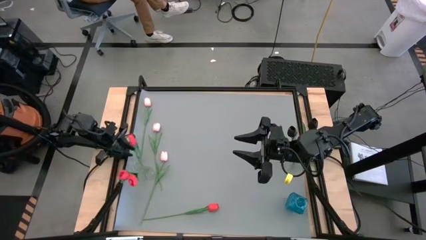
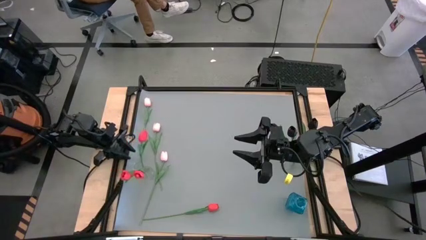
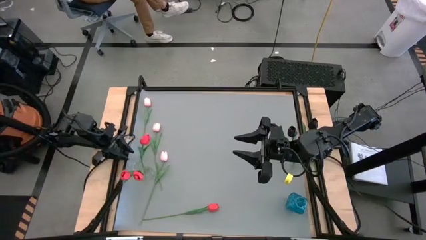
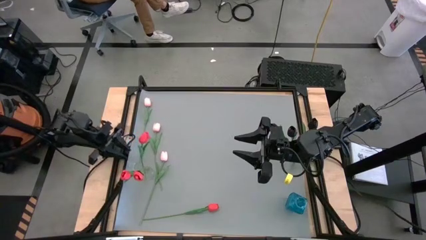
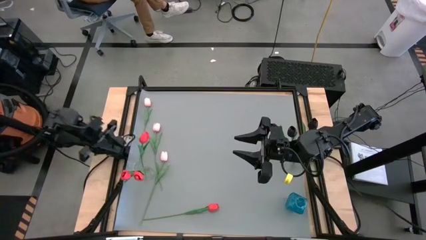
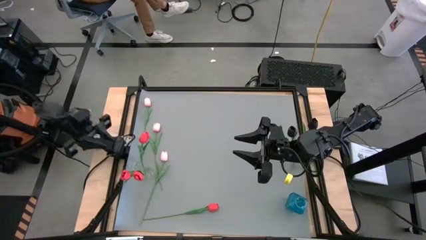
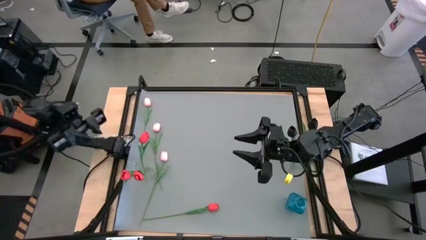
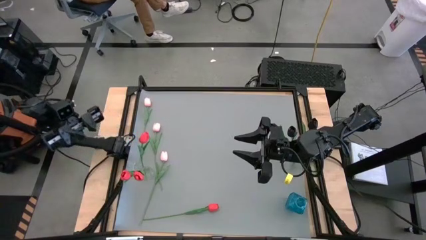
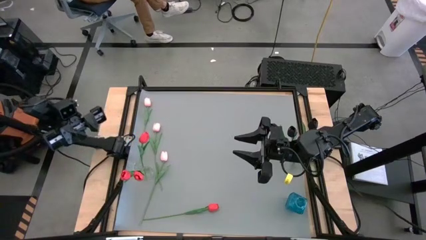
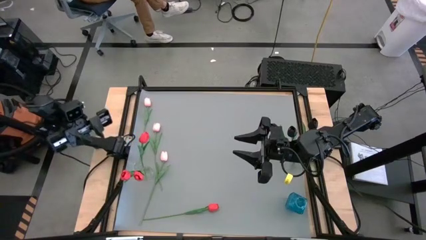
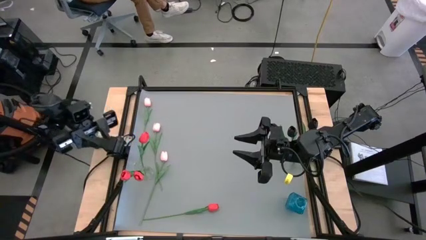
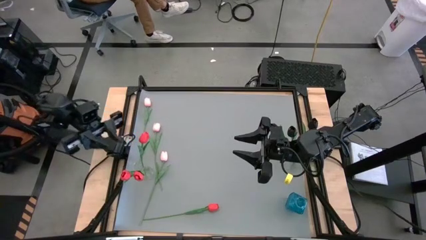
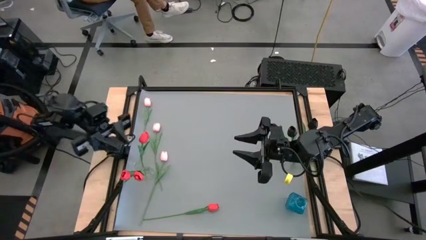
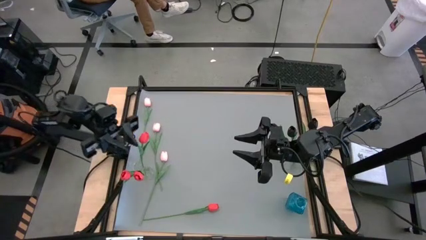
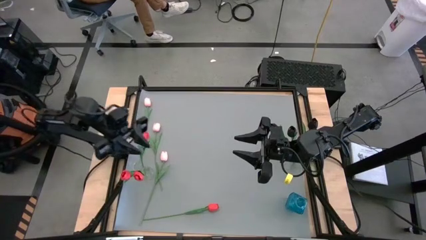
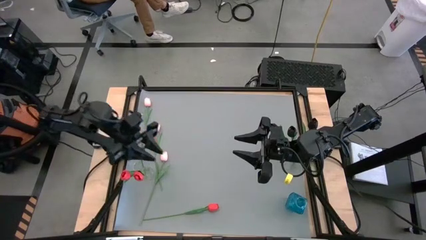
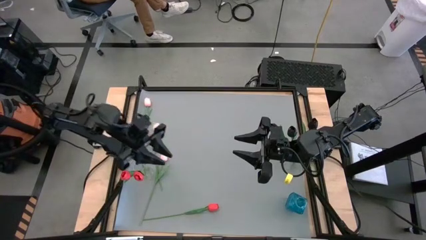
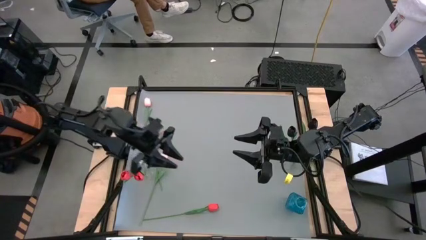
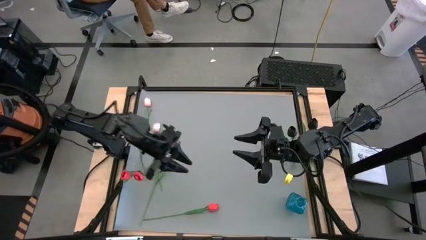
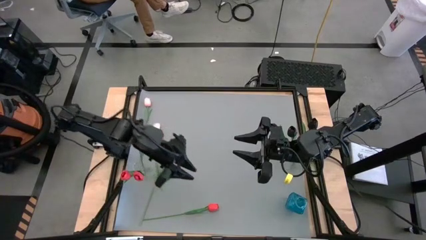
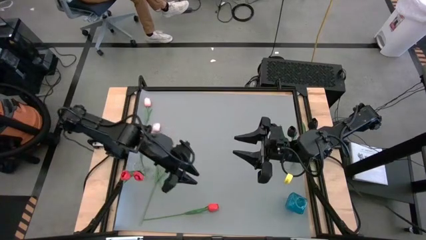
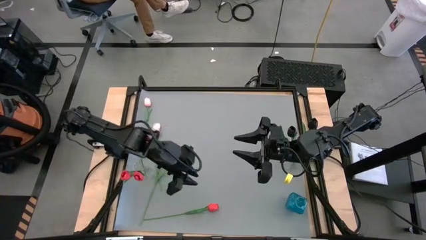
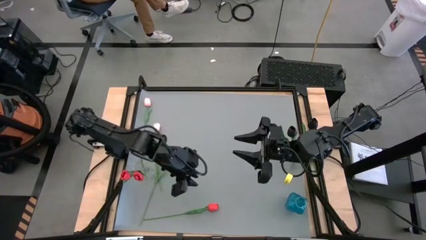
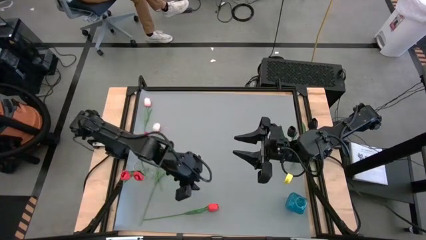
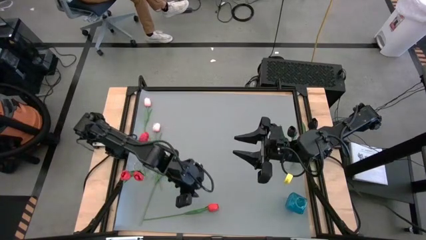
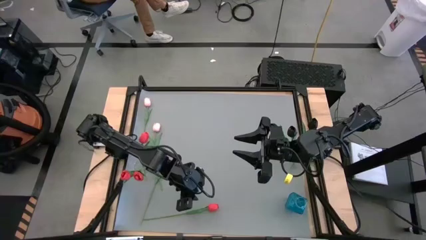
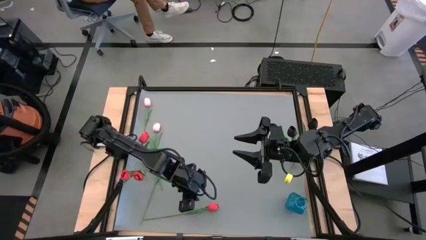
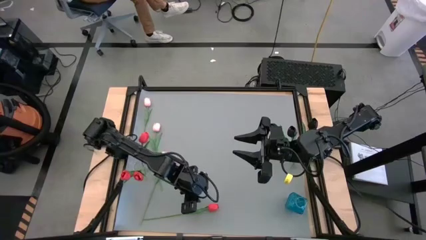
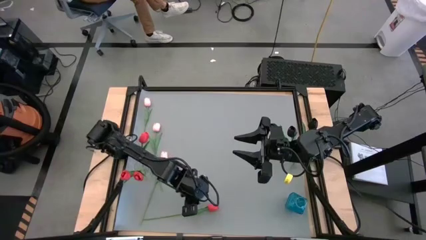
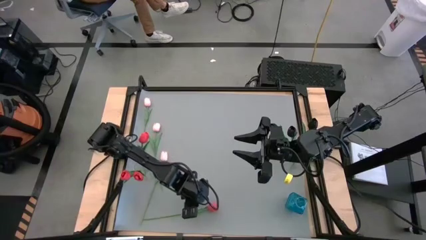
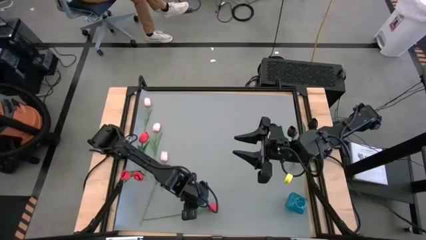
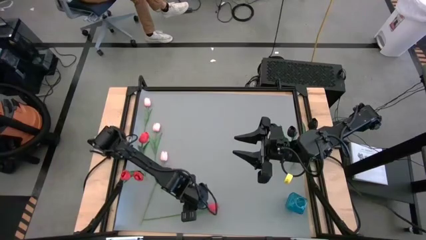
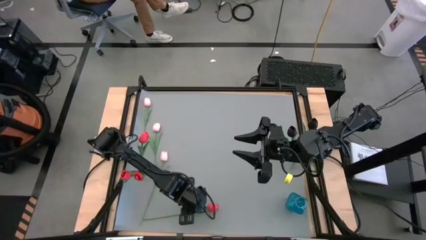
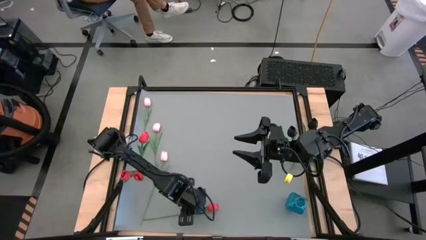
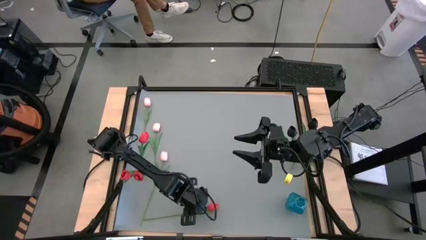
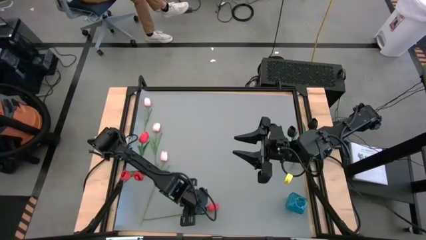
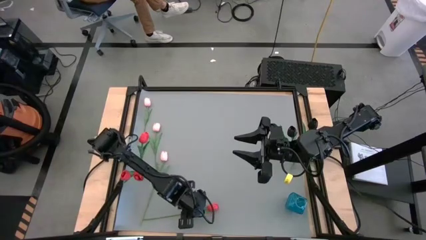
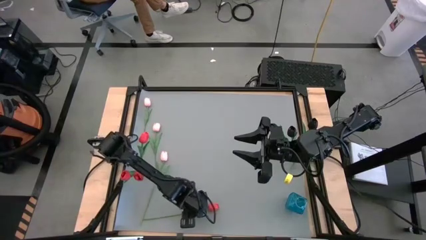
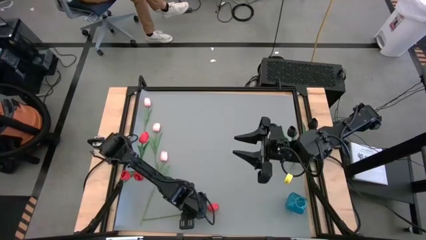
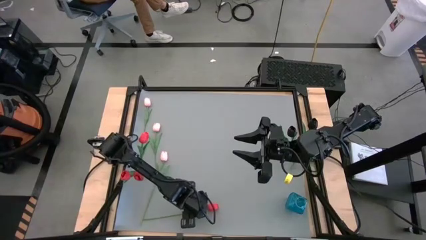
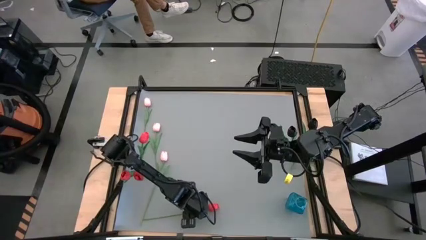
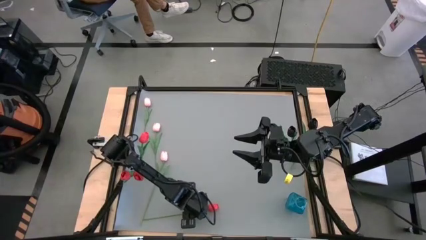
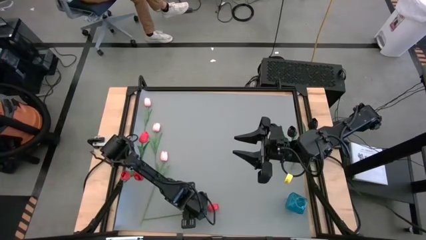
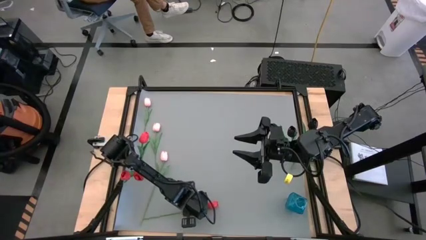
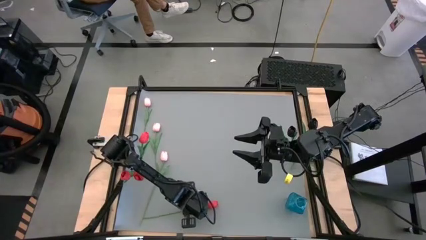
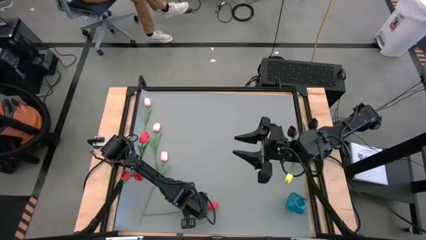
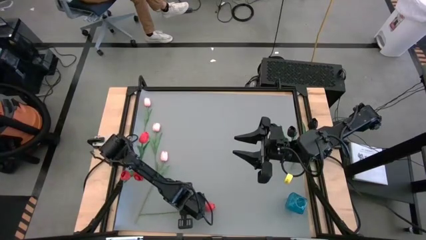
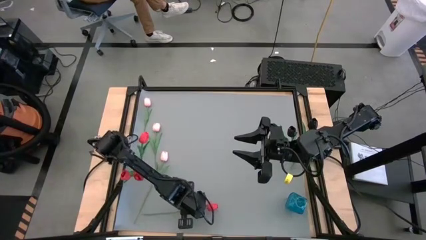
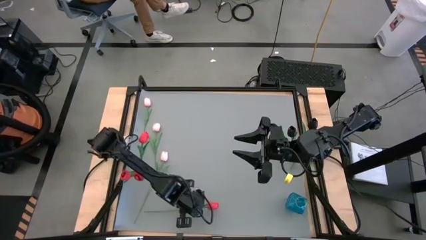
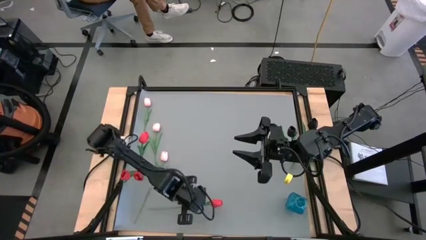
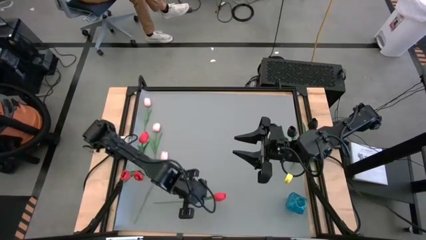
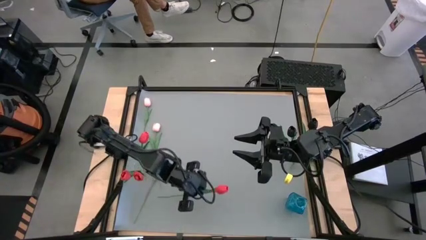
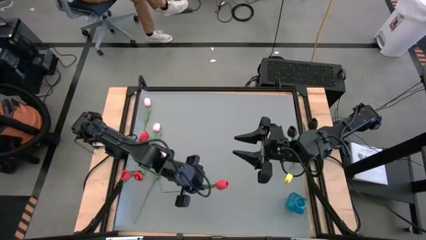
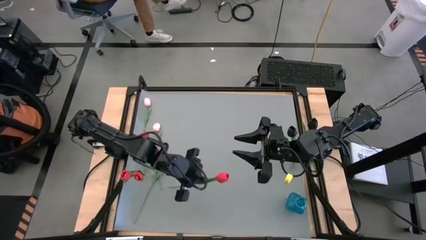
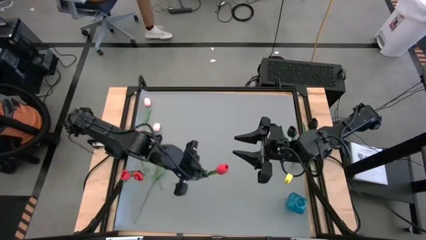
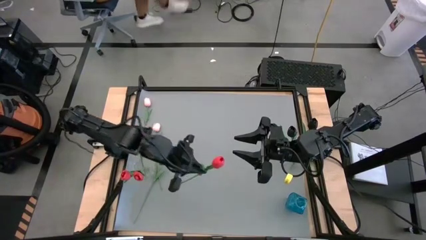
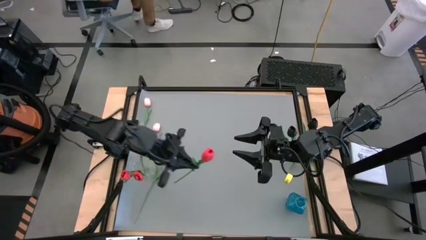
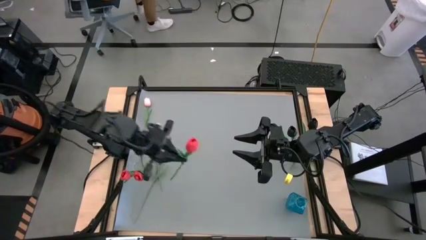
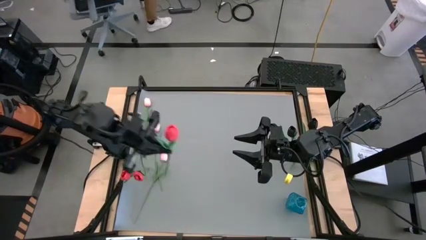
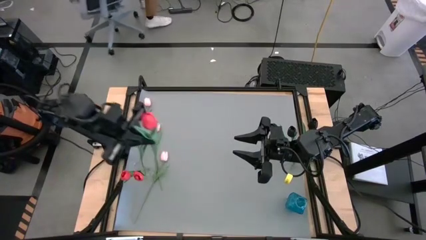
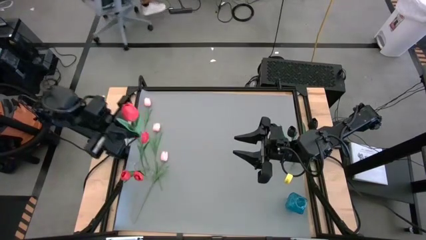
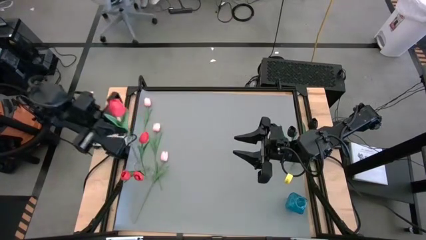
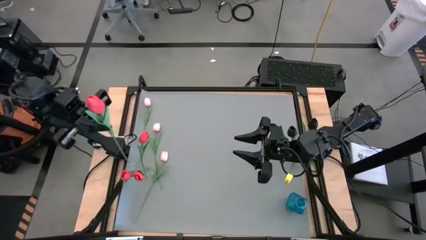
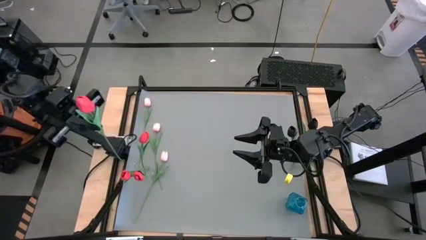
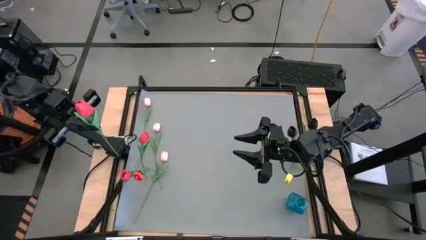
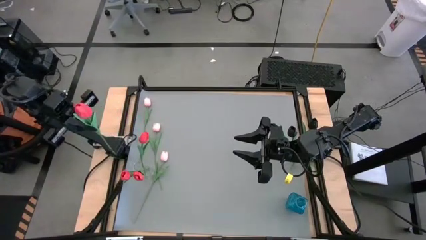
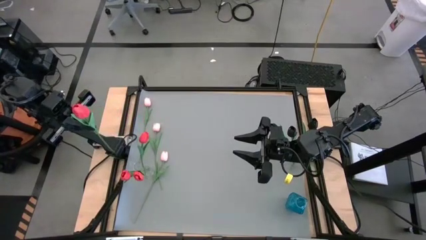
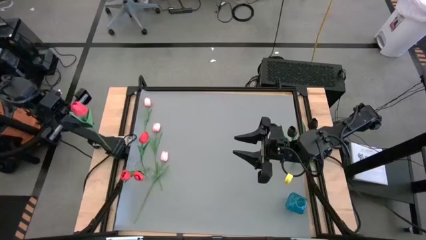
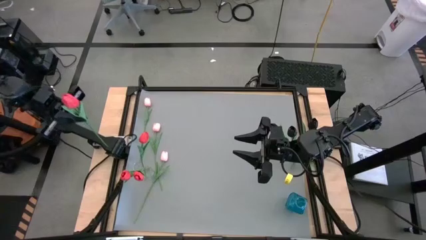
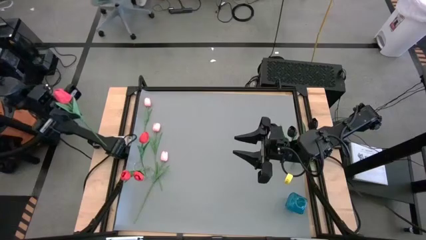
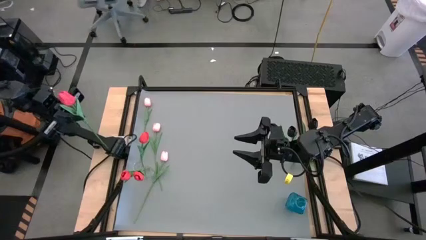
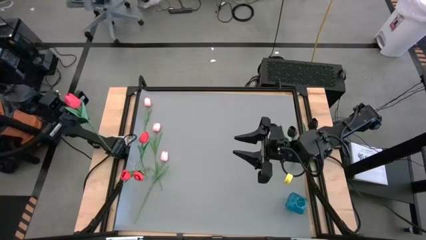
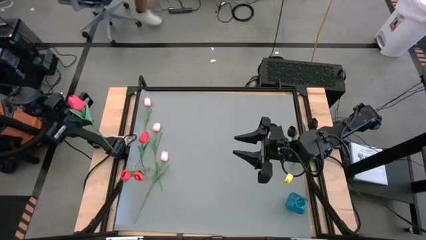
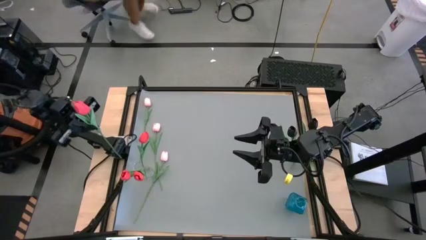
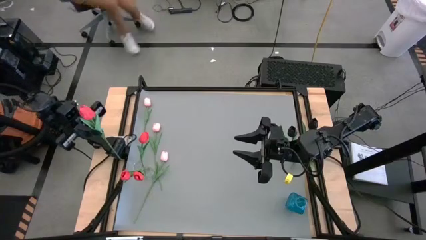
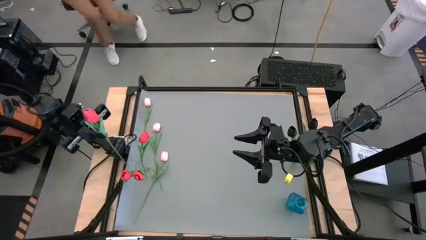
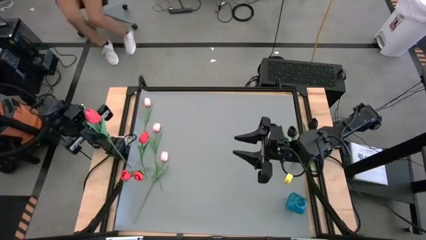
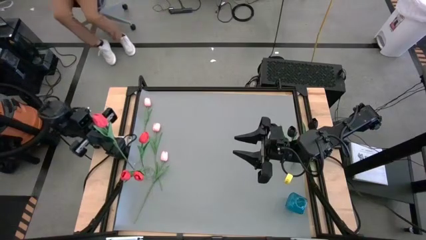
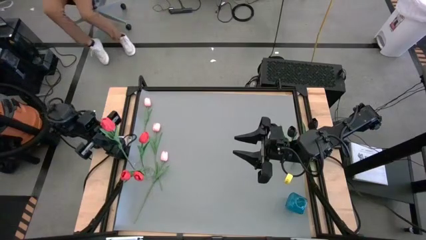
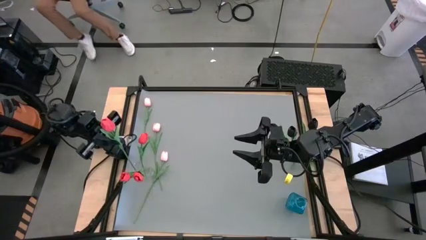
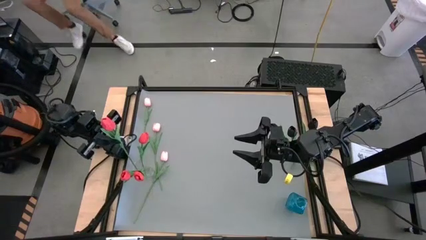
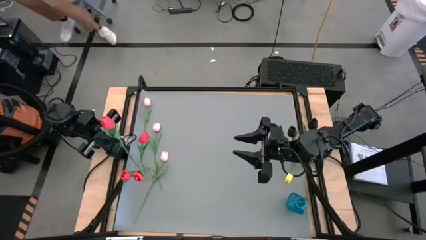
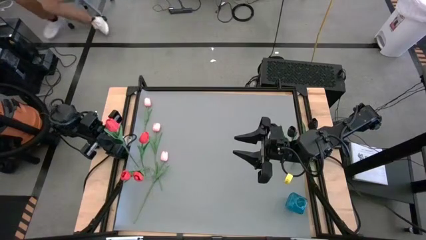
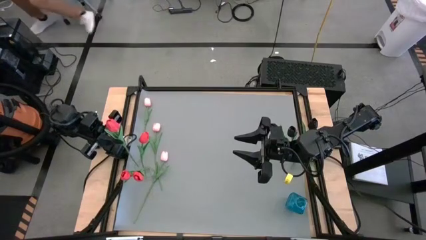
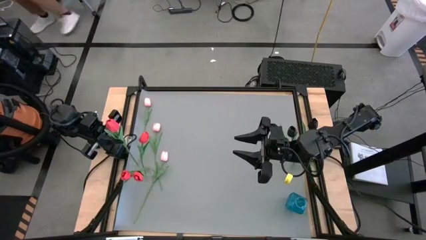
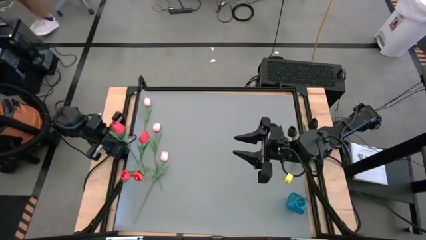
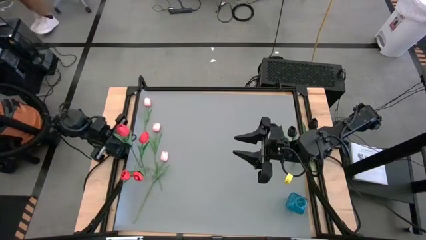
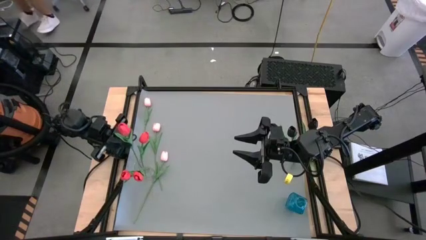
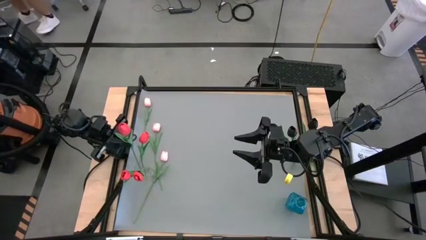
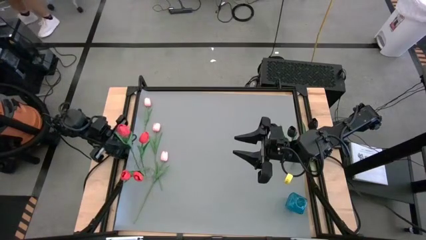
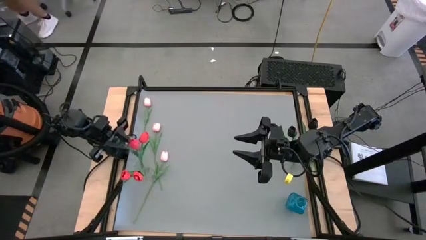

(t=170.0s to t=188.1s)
Task: Sort flowers into vase by color
Put the red tulip into the left transparent vase
